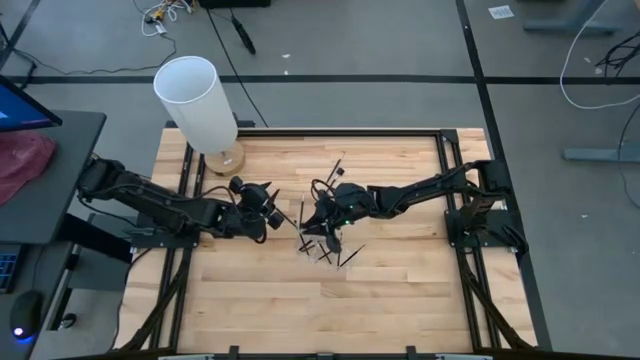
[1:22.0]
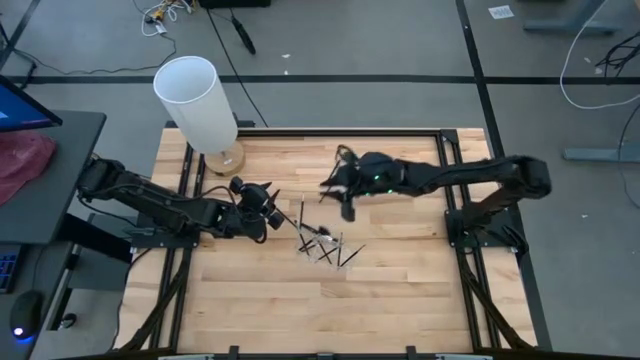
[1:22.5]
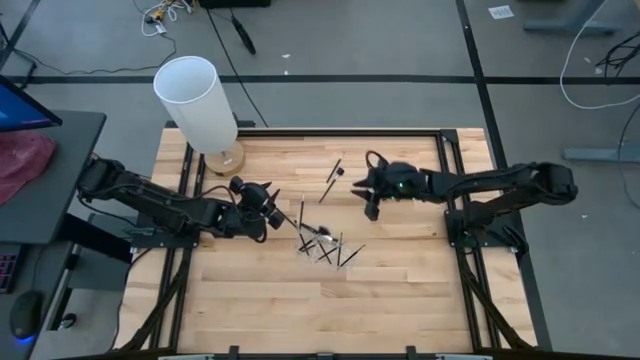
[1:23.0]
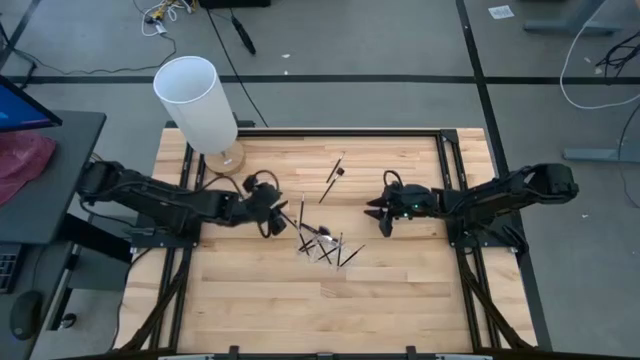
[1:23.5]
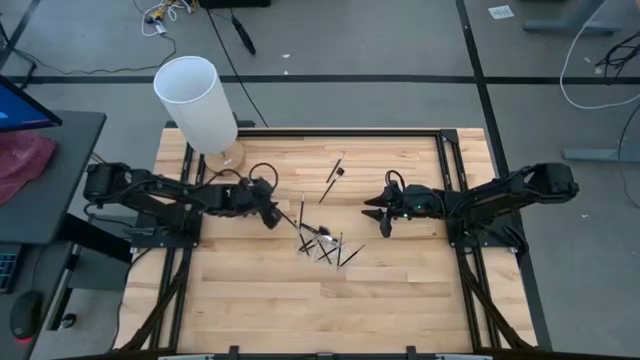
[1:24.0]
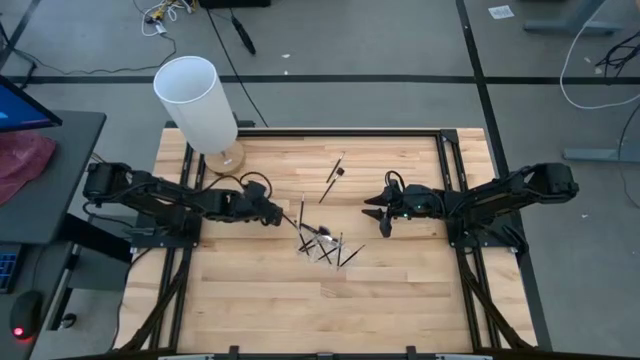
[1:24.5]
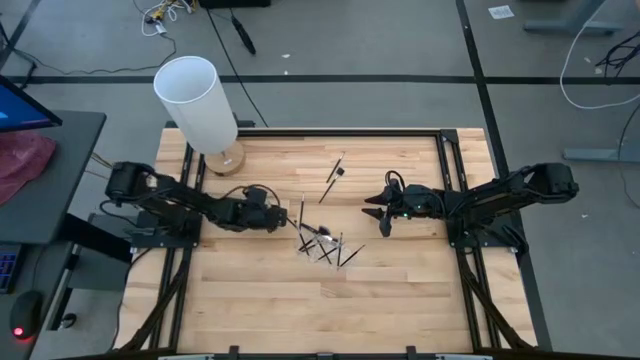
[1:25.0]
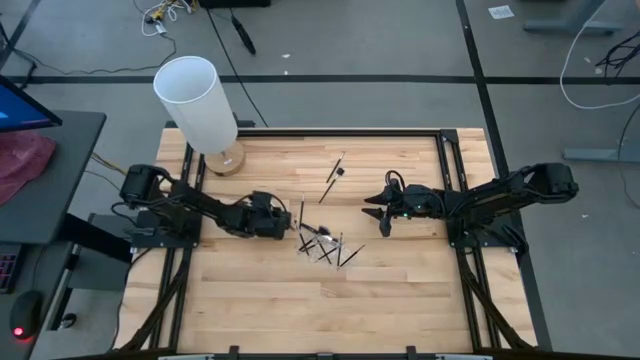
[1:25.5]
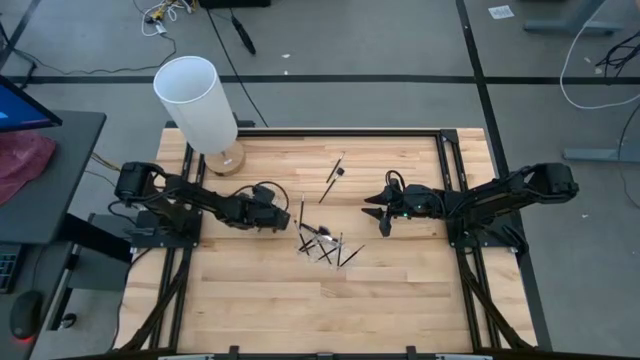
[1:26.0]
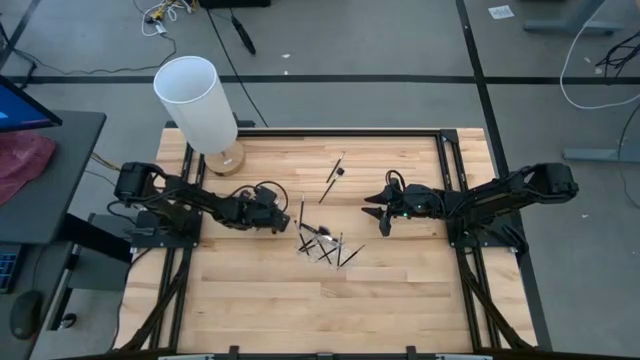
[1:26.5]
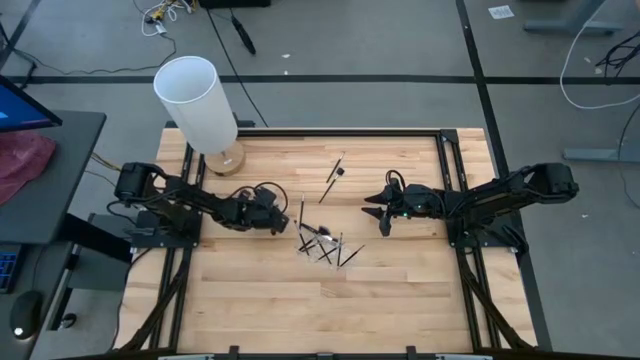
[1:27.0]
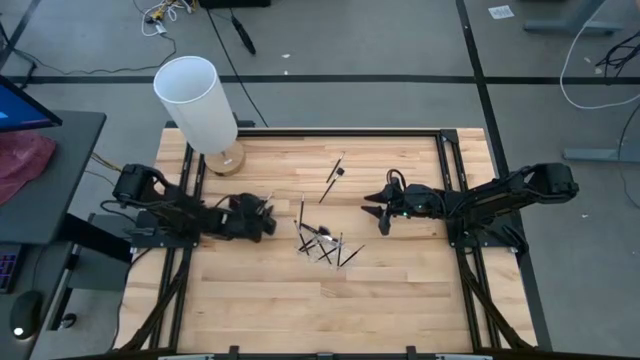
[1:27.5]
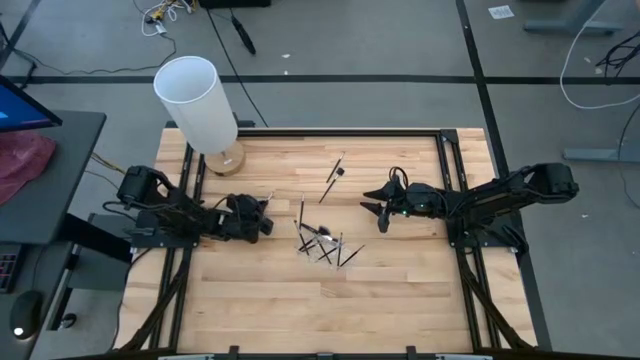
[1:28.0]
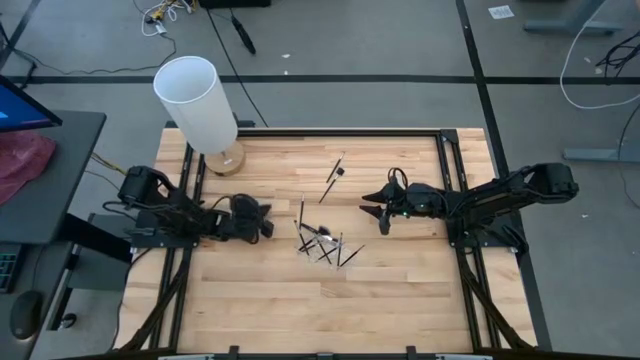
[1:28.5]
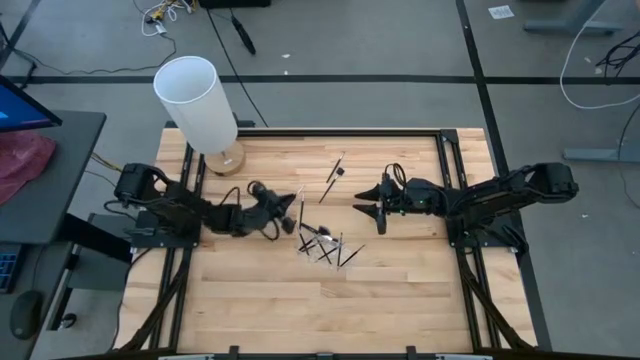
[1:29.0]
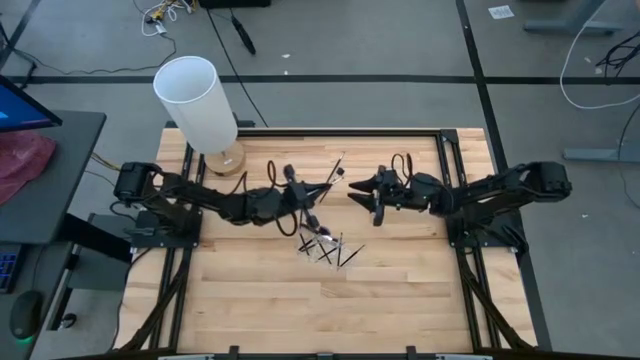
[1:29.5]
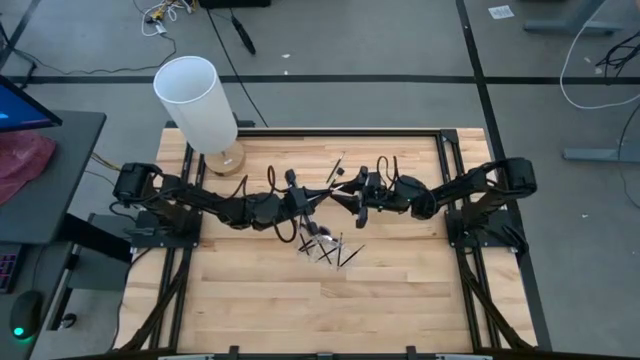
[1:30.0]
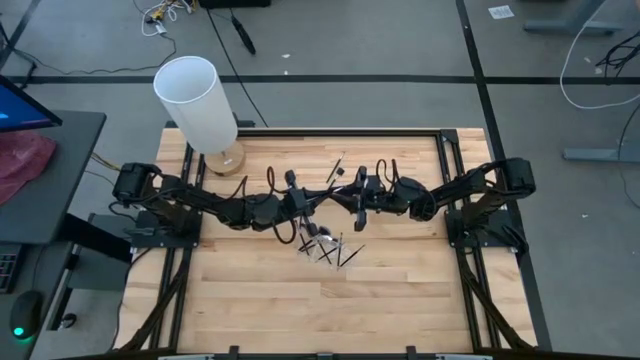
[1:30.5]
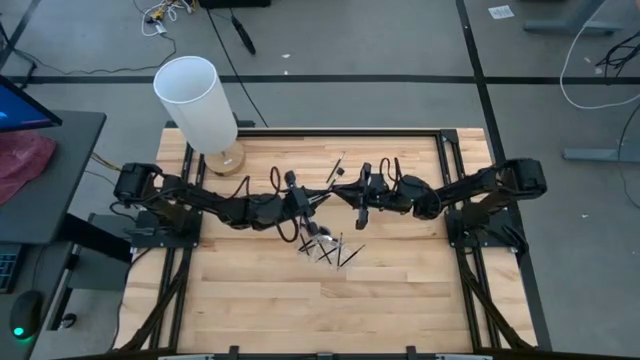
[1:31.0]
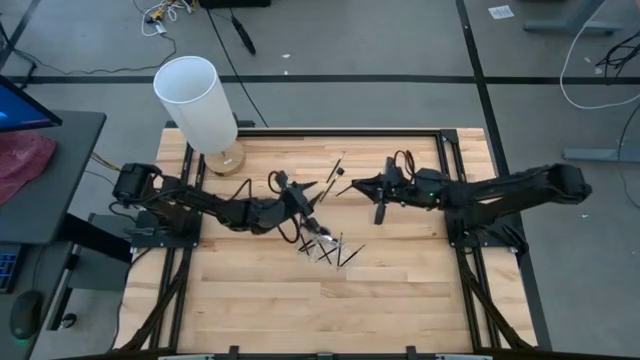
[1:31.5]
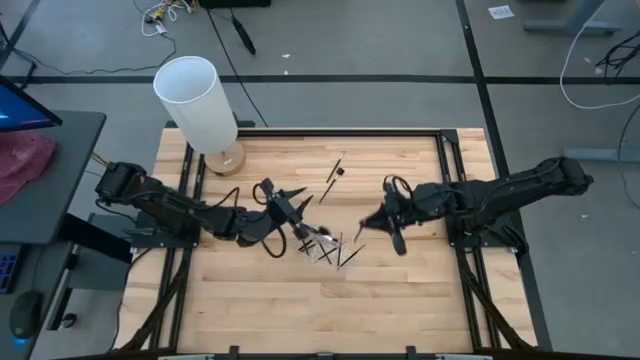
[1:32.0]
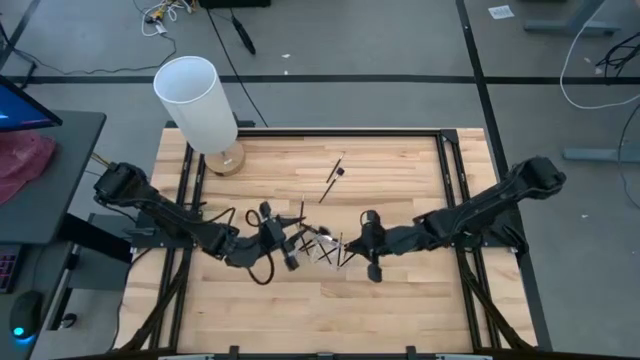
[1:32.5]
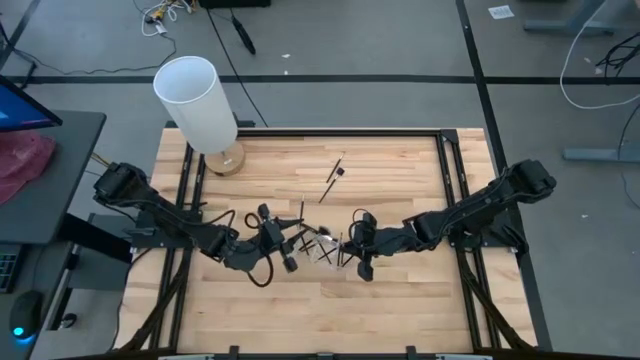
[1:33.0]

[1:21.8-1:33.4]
Task: Put items in baskets/containers
Put the black eyeshadow brush into the transparent organizer

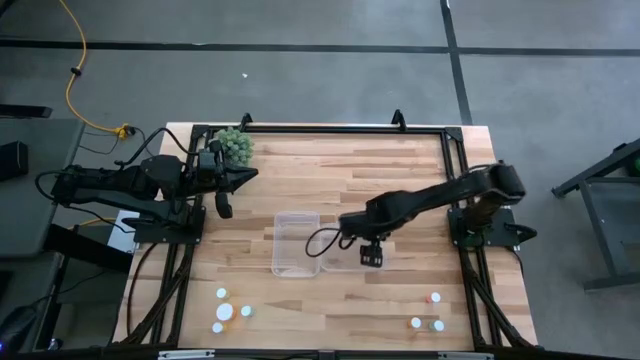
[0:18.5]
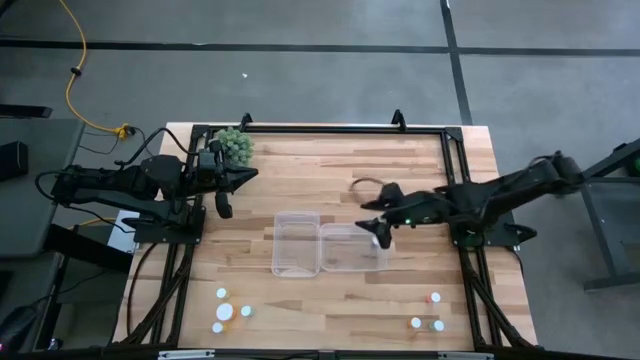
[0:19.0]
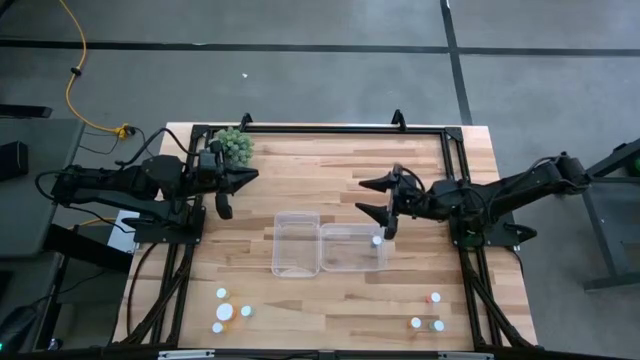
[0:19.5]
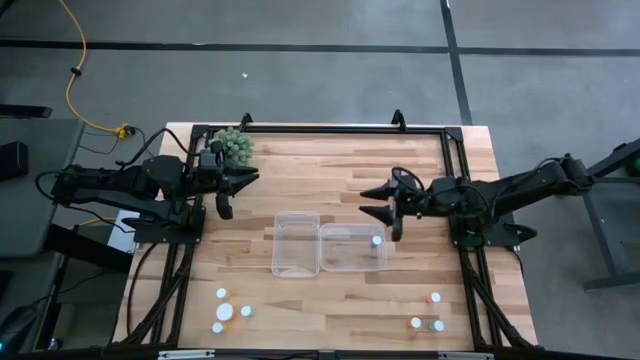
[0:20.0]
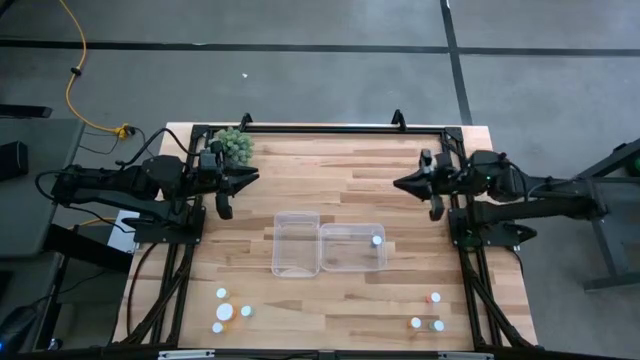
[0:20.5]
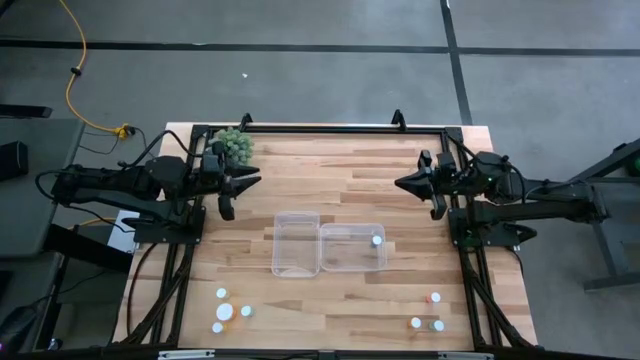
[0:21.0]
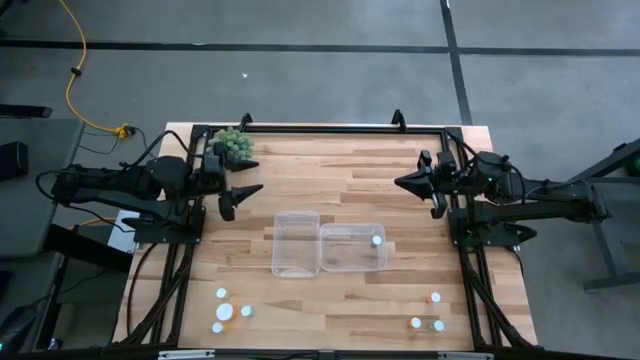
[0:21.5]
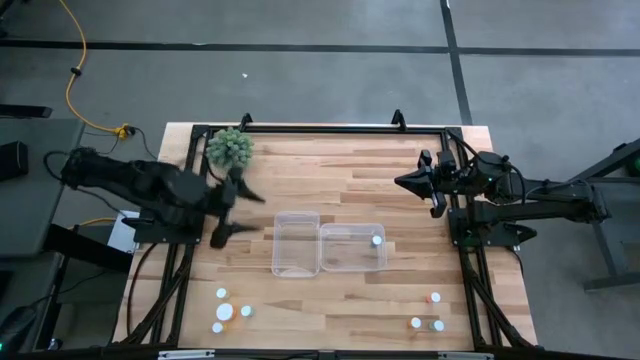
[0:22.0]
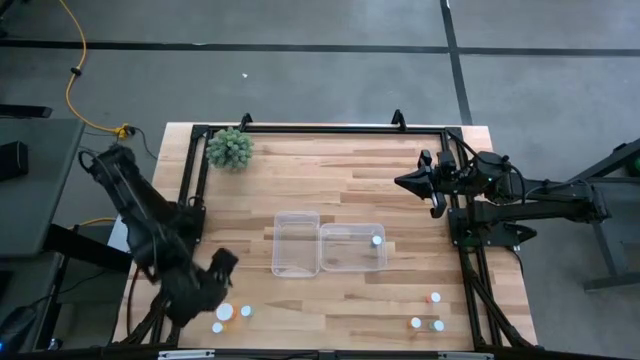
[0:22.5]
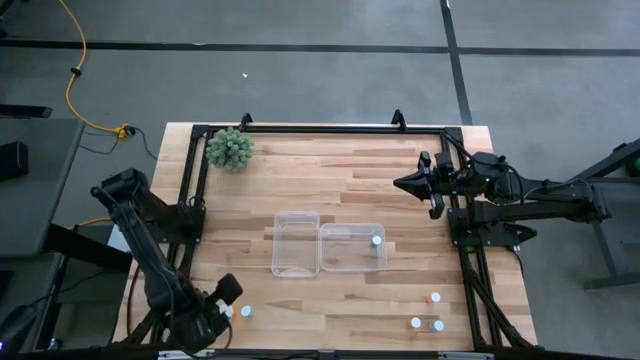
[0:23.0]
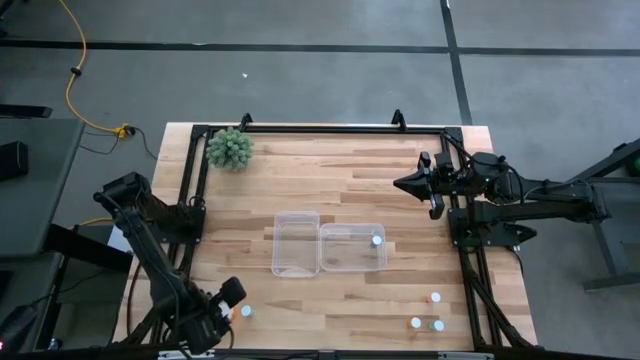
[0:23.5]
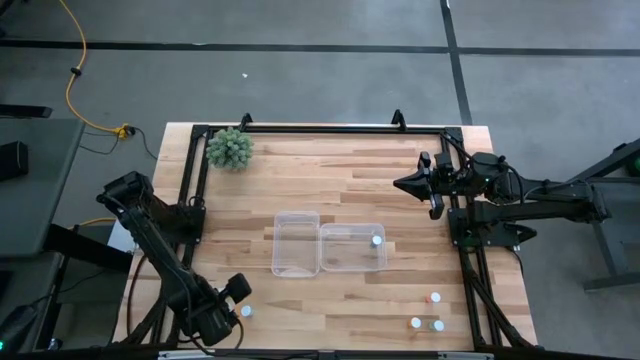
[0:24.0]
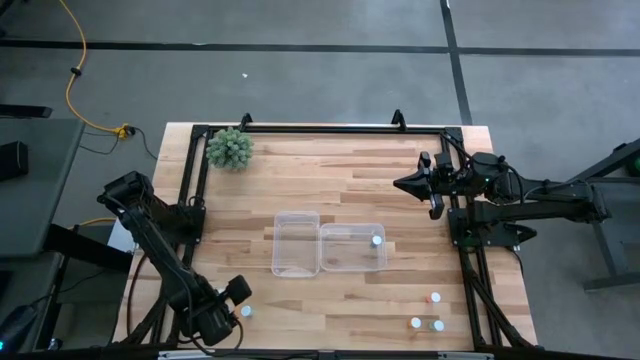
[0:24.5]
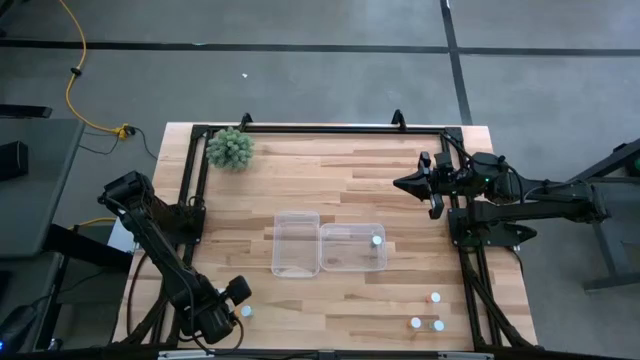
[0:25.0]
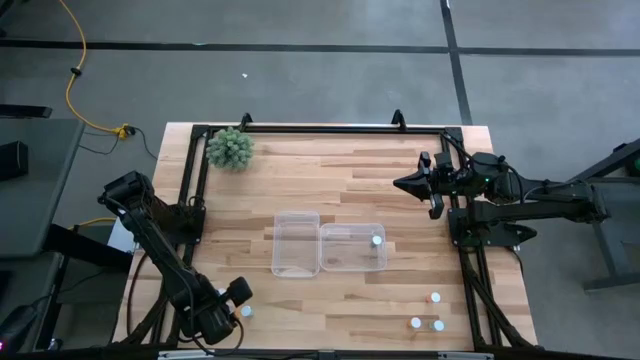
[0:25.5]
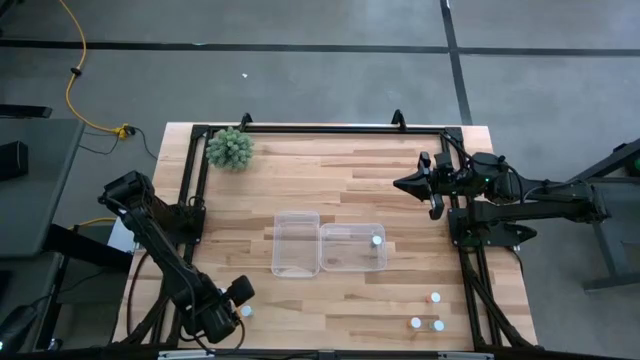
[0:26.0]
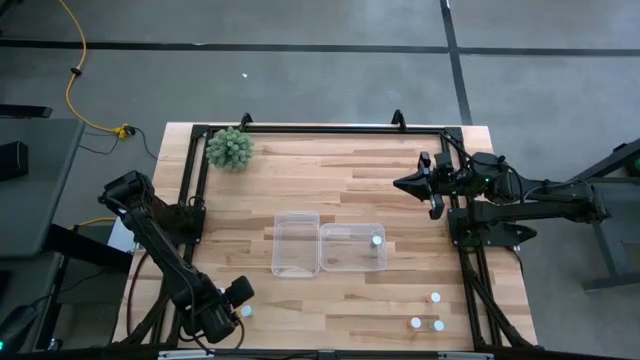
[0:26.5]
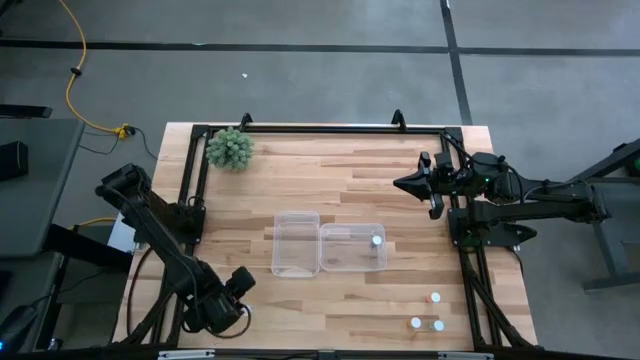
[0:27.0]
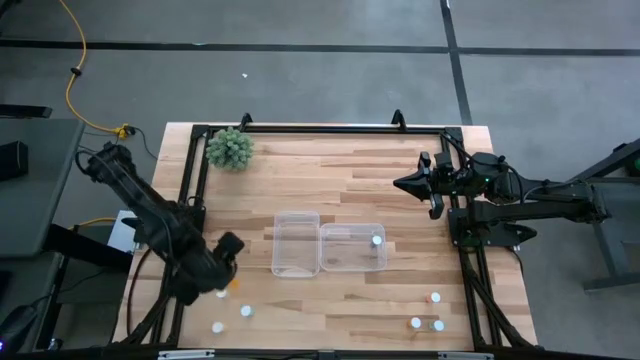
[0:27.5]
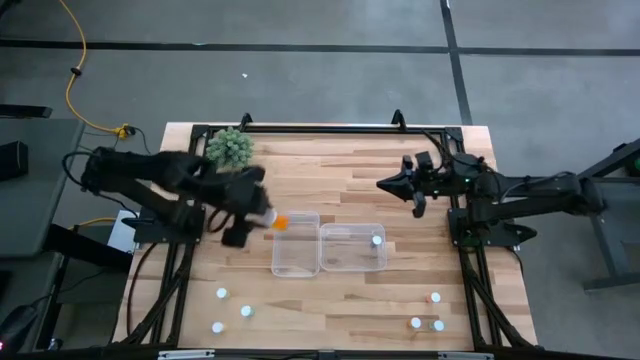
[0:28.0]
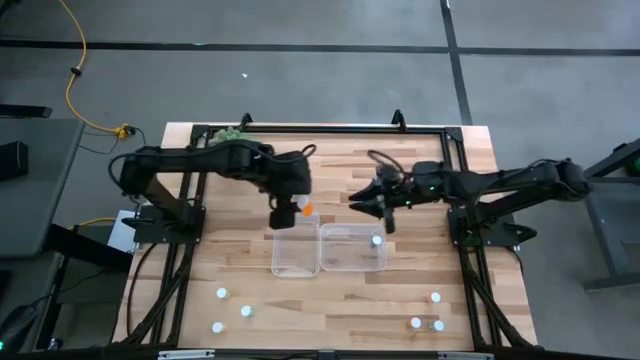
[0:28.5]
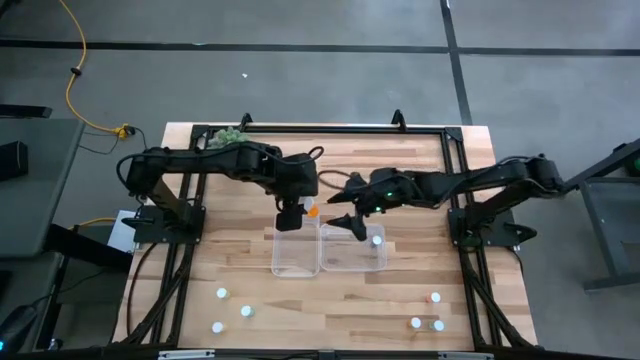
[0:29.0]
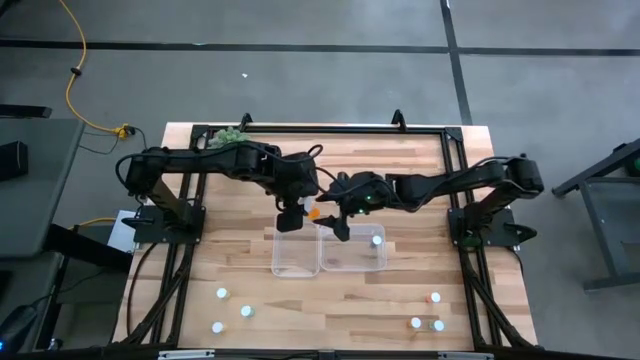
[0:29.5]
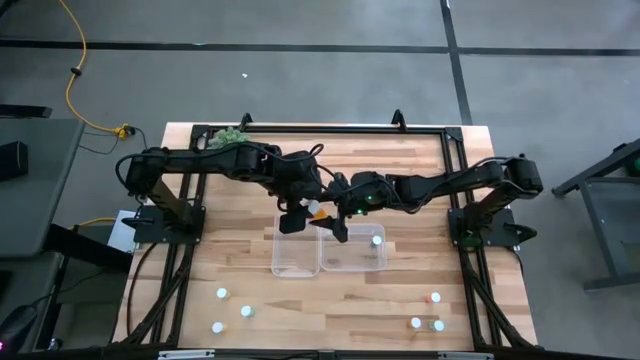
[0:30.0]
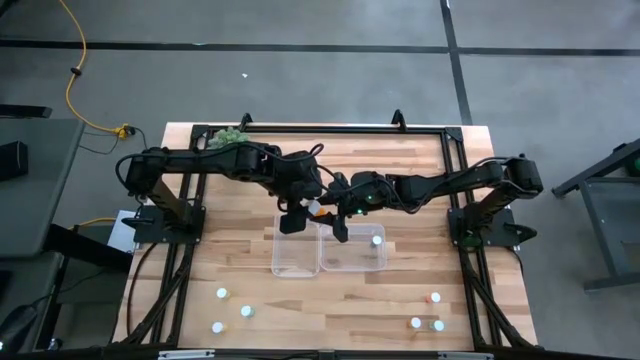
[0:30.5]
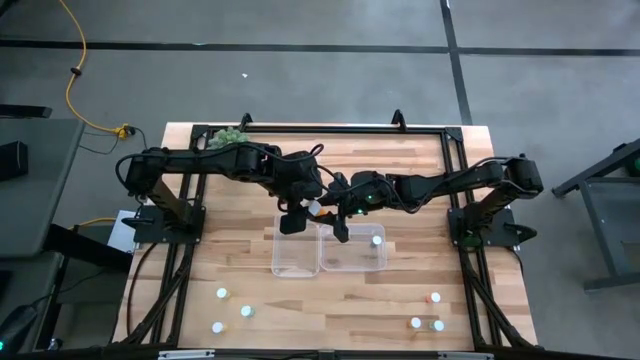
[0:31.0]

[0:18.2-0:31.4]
Task: Pick and place medicine bottles into bin by pill shape (circle, oval)
Put the large orange pill bottle into the right transparent bin
